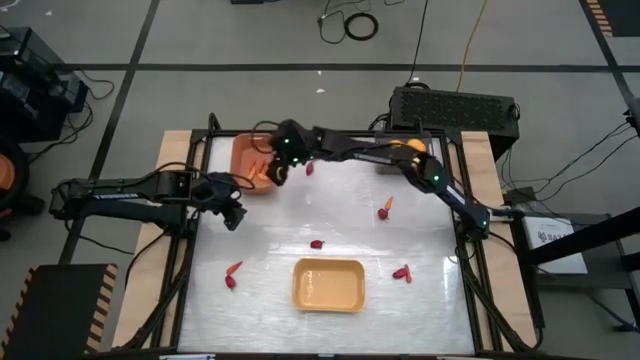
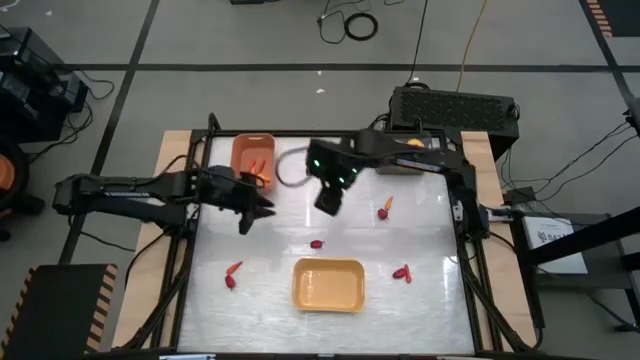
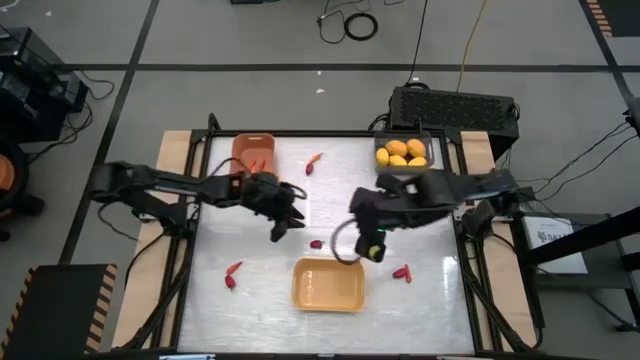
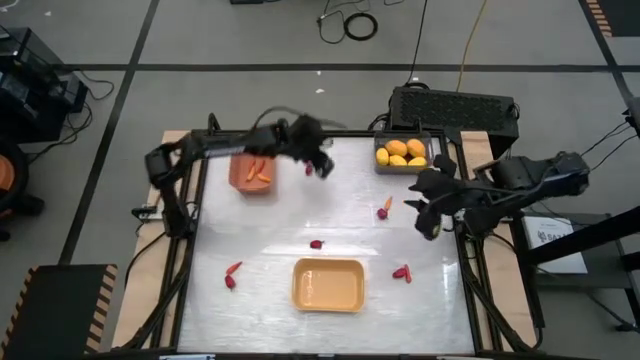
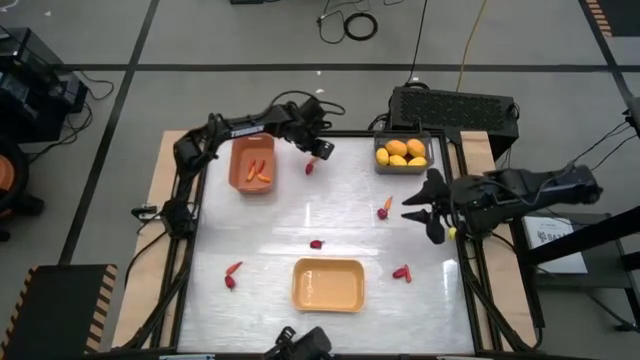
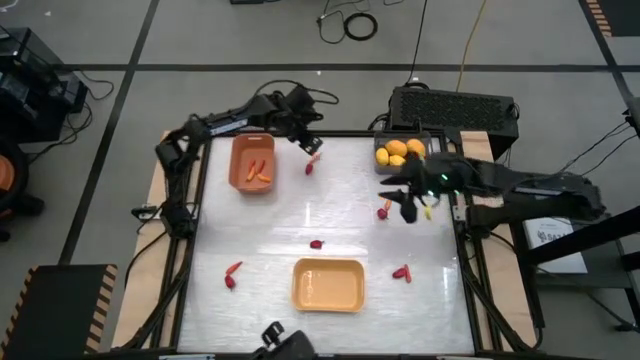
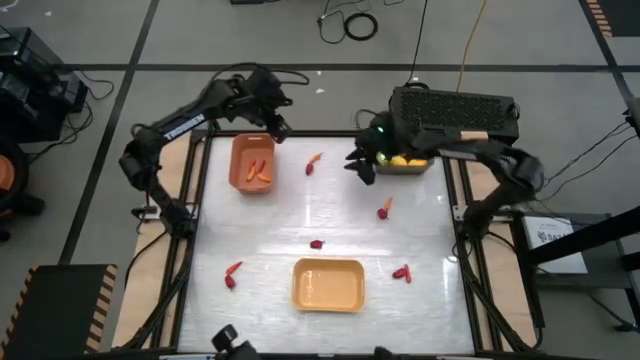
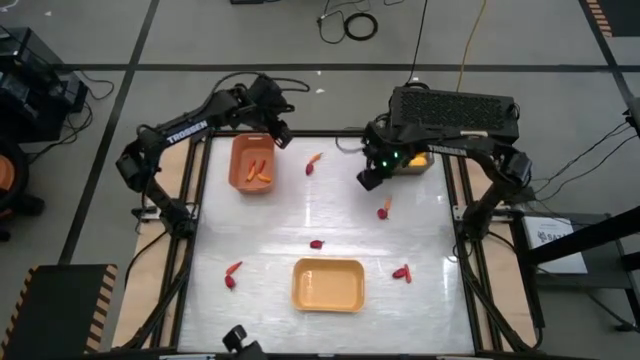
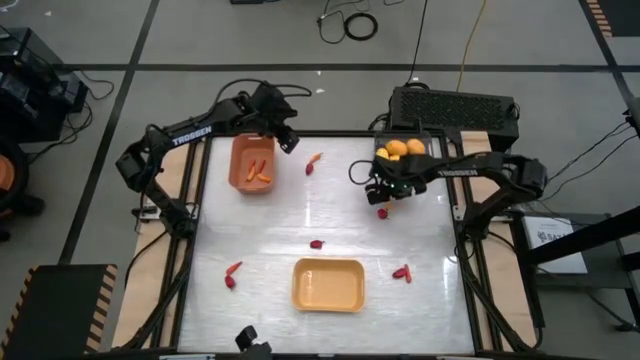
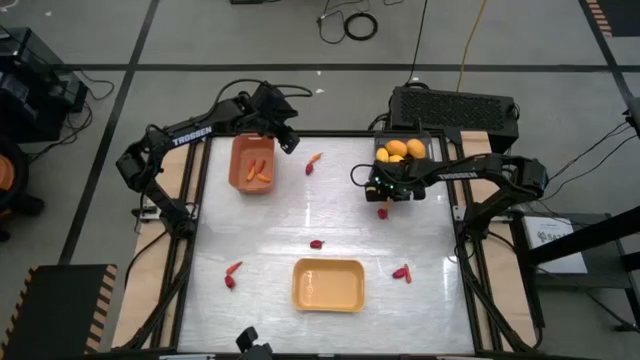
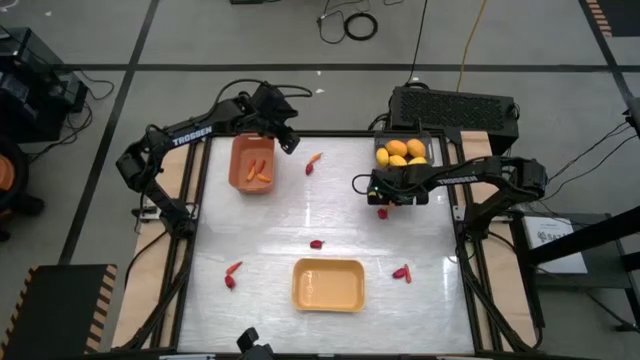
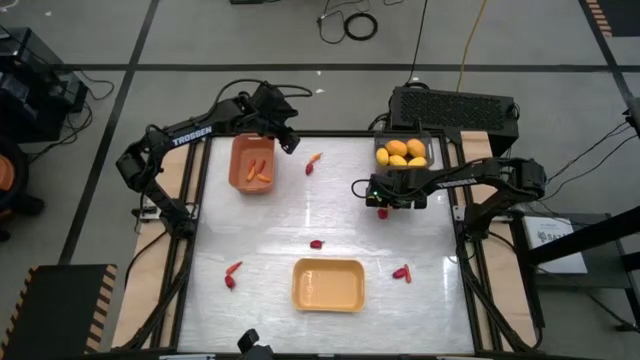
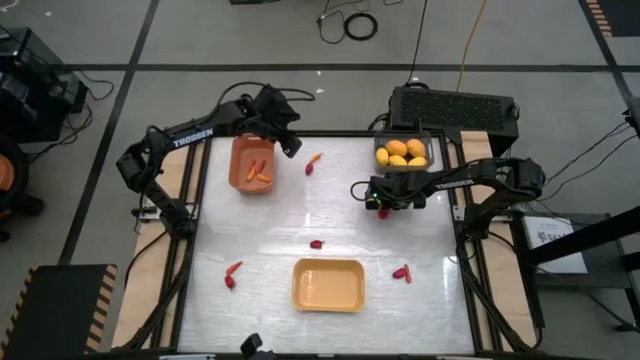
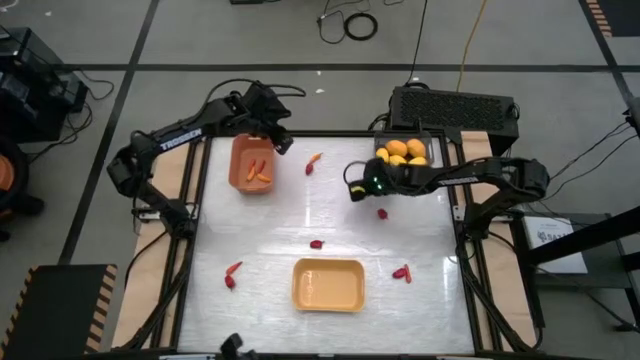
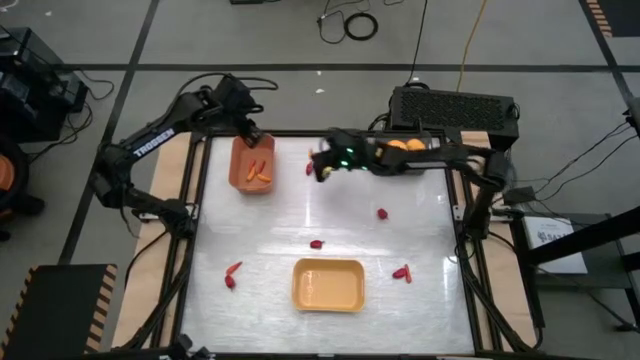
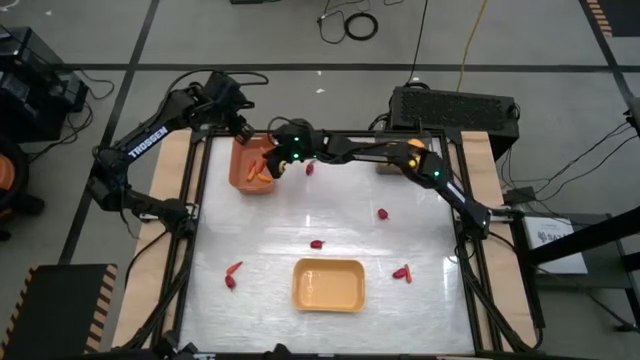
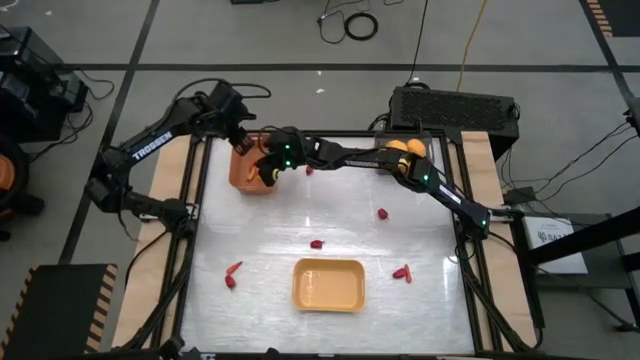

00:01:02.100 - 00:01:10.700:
Task: Sort produce into baskets
Put the yellow orange chili into the orange bin

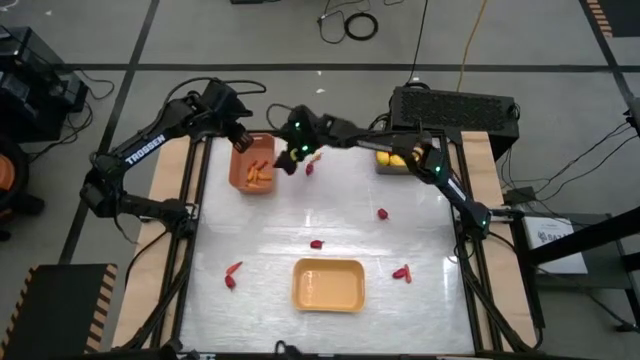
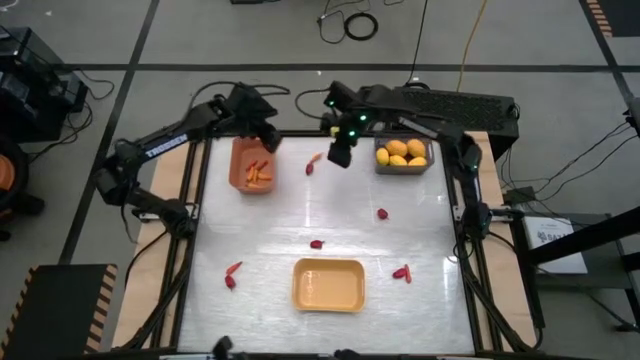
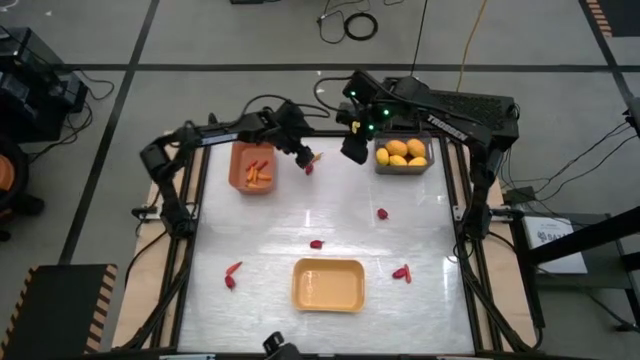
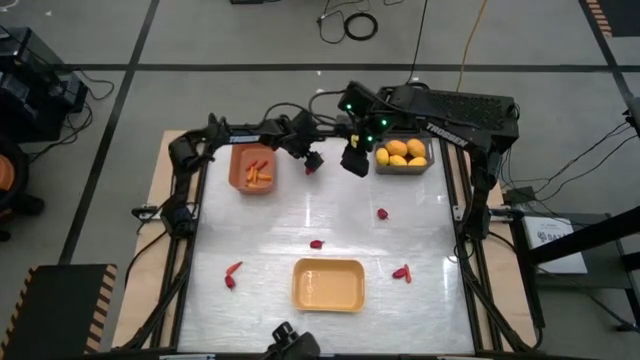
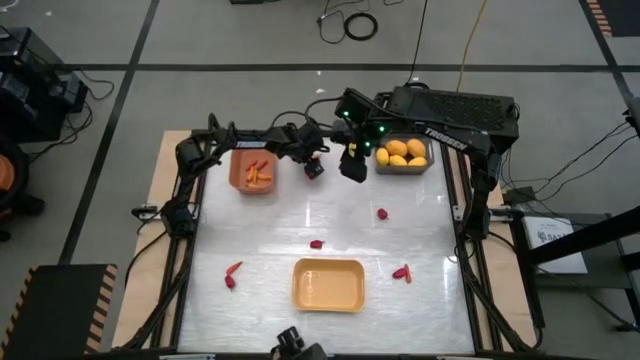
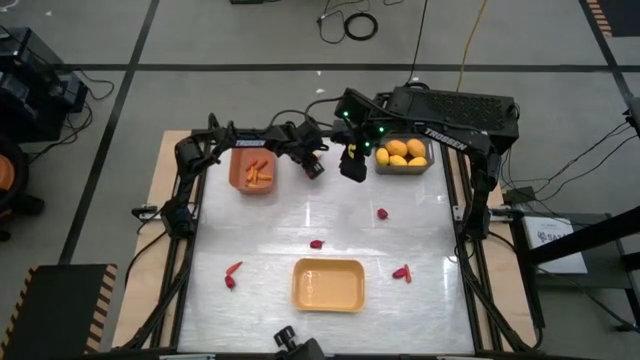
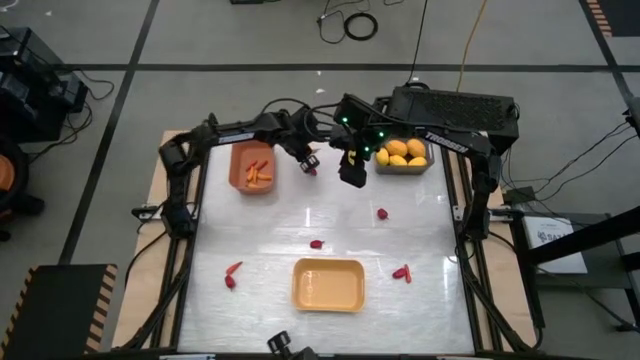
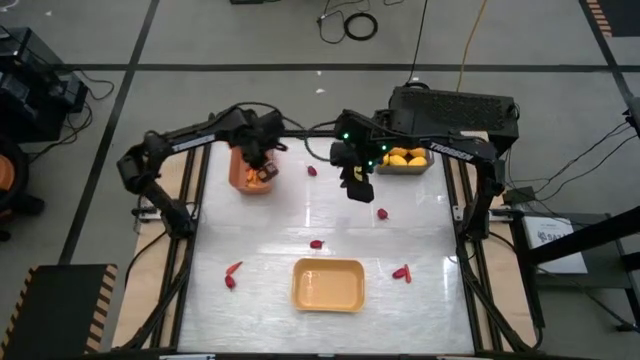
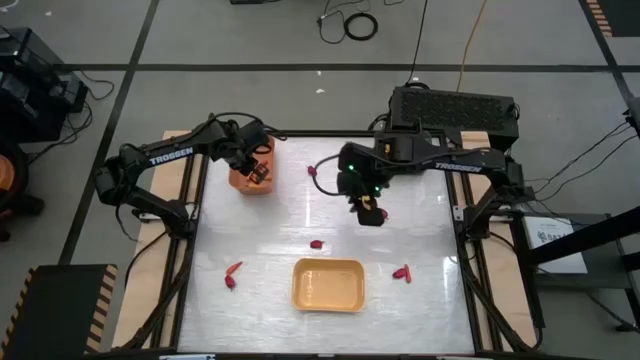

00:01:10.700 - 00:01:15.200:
Put the yellow orange chili into the orange bin

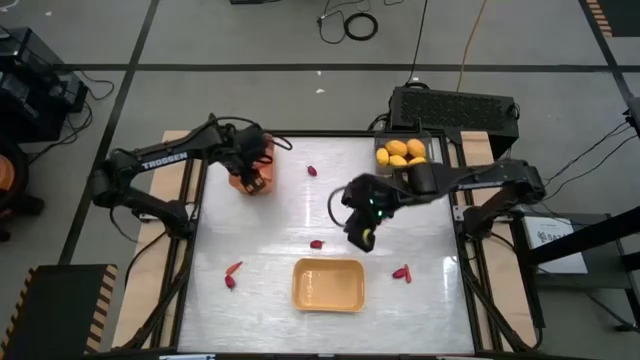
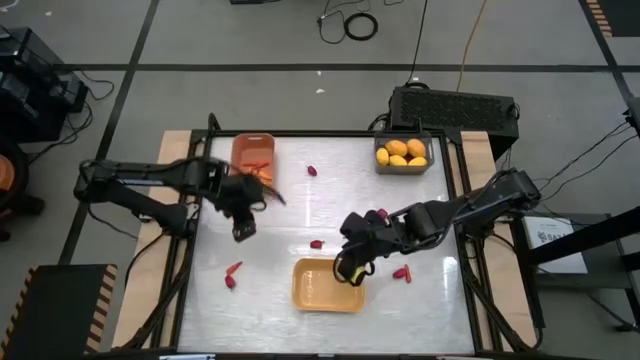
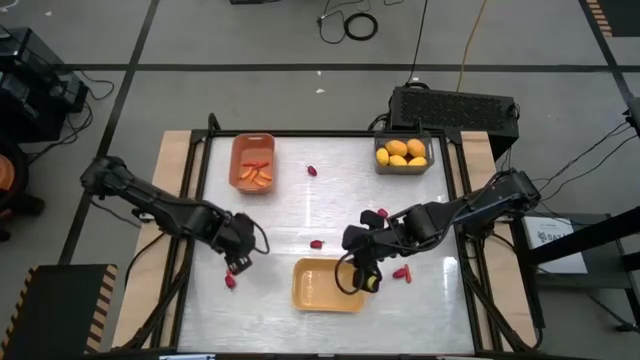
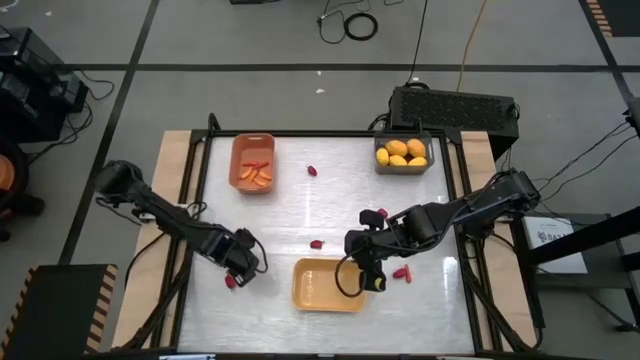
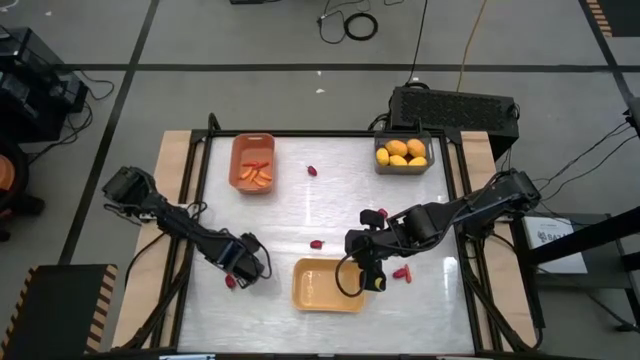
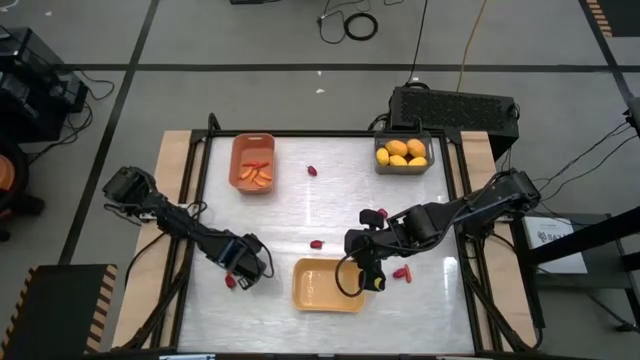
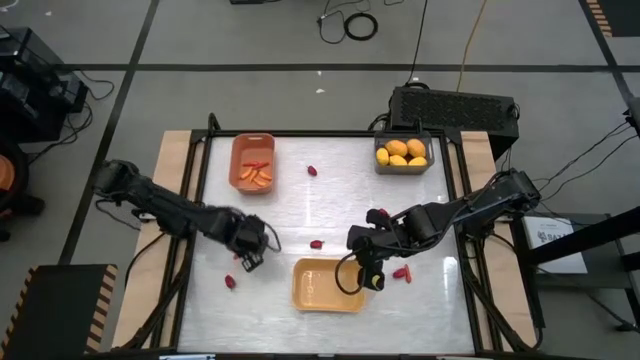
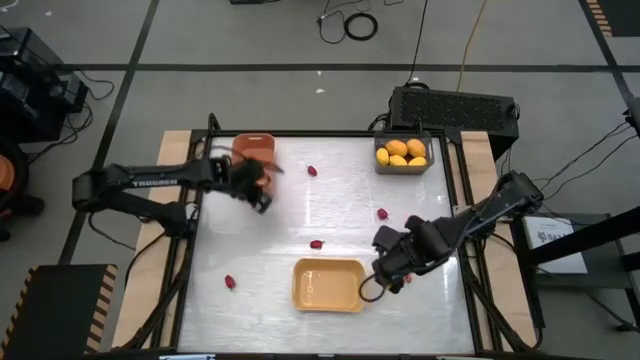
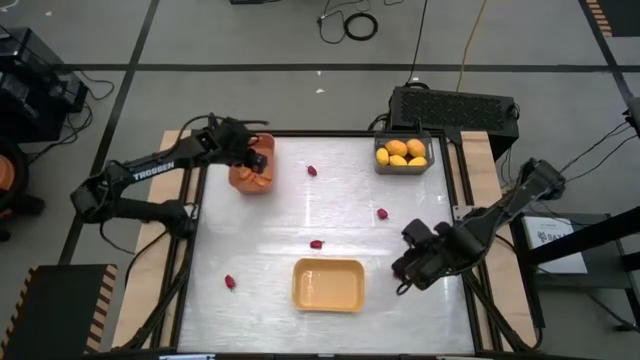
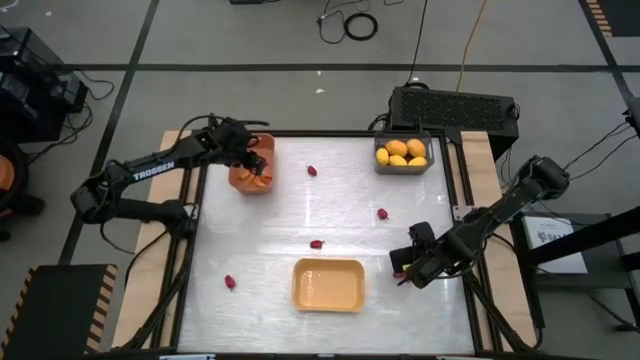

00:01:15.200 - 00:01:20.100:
Put the red chili into the yellow bin

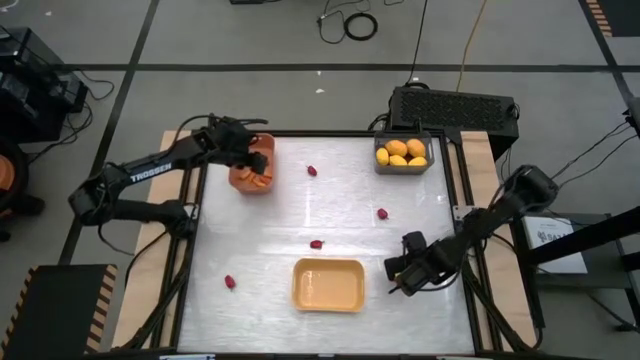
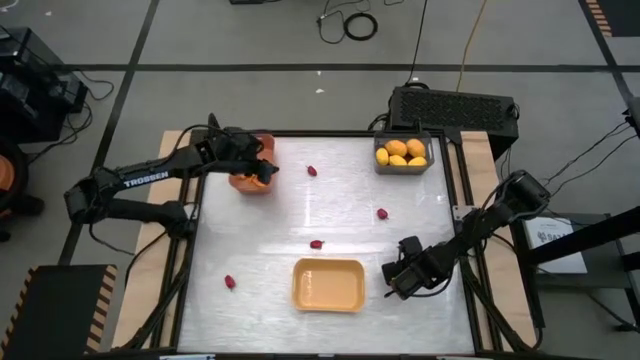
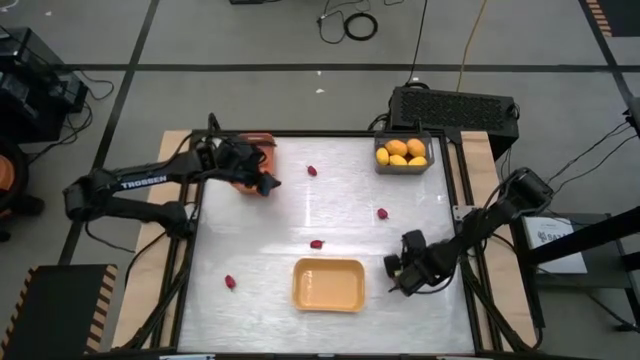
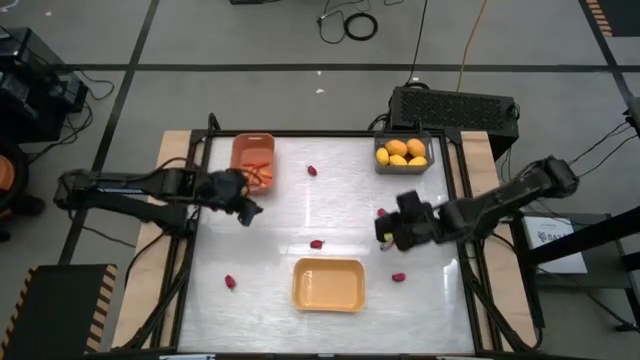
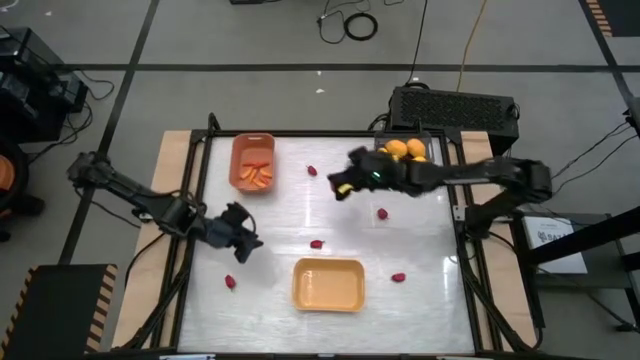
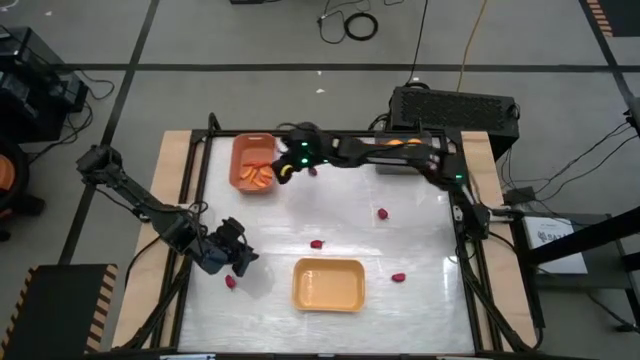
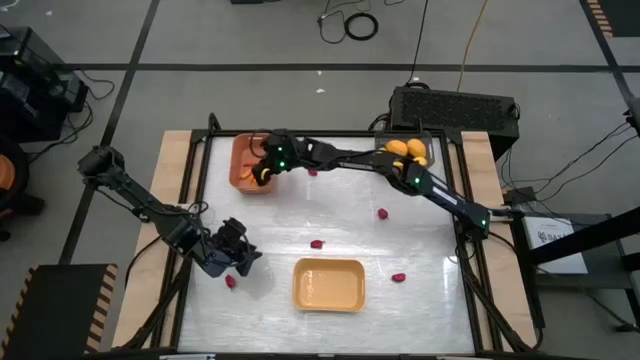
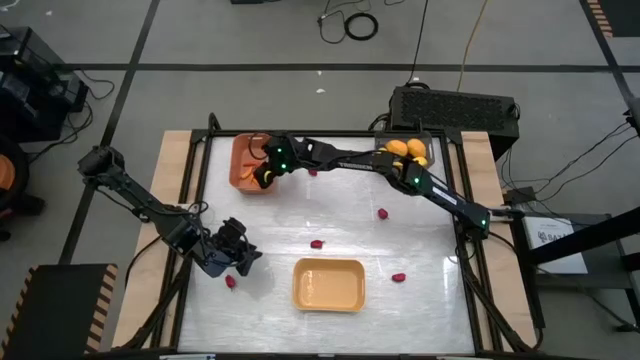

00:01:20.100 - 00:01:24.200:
Put the orange chili into the orange bin
